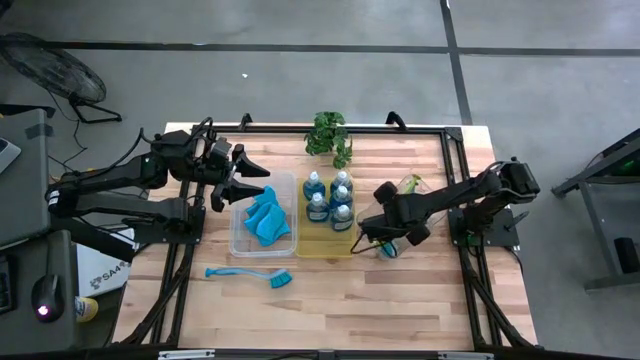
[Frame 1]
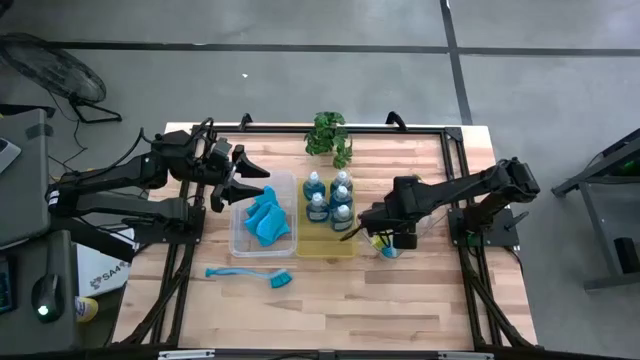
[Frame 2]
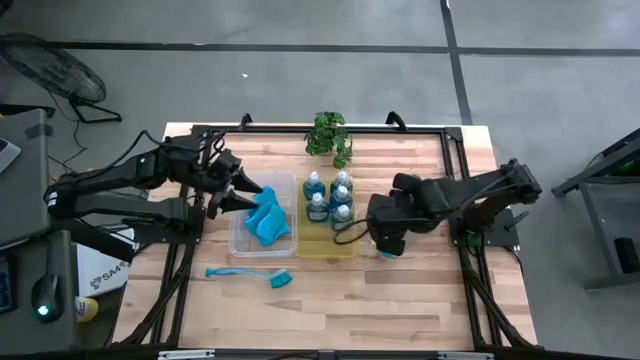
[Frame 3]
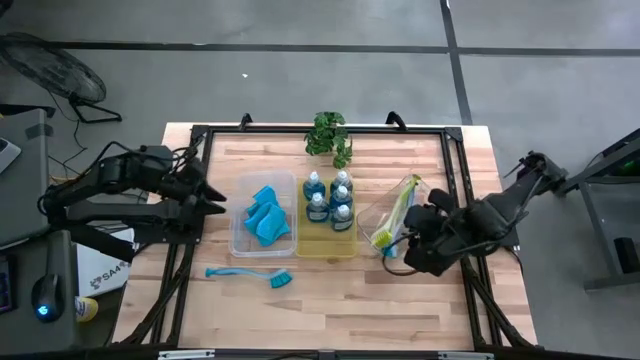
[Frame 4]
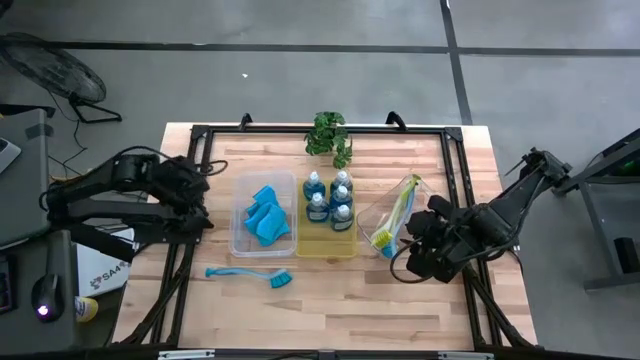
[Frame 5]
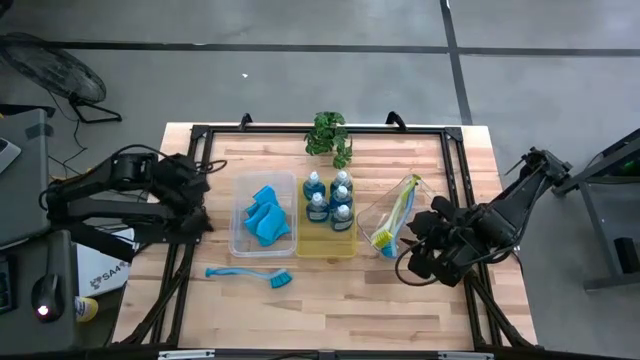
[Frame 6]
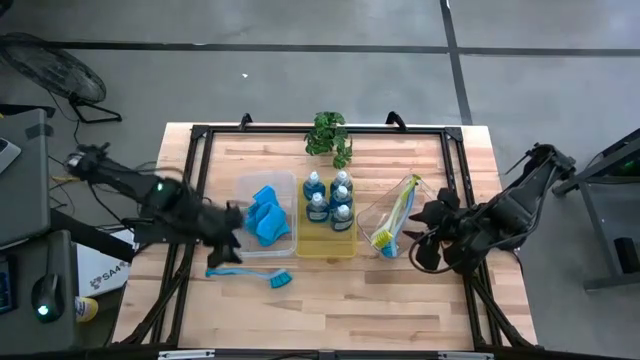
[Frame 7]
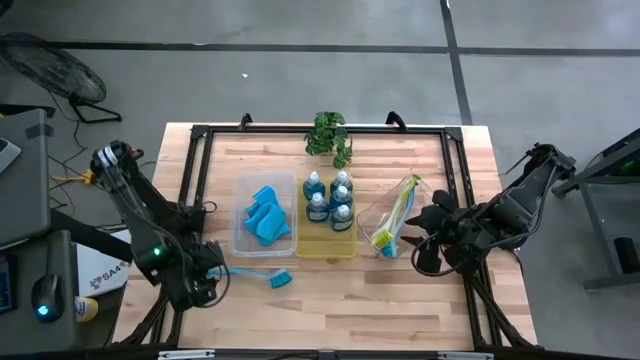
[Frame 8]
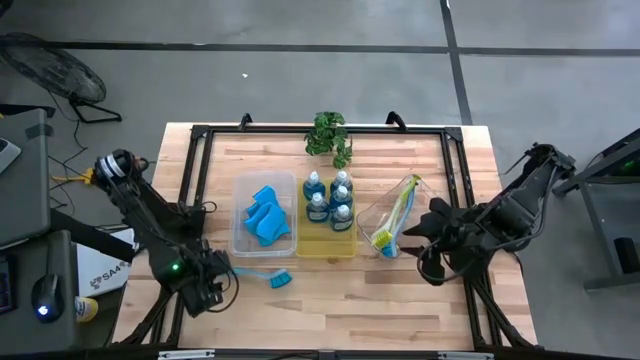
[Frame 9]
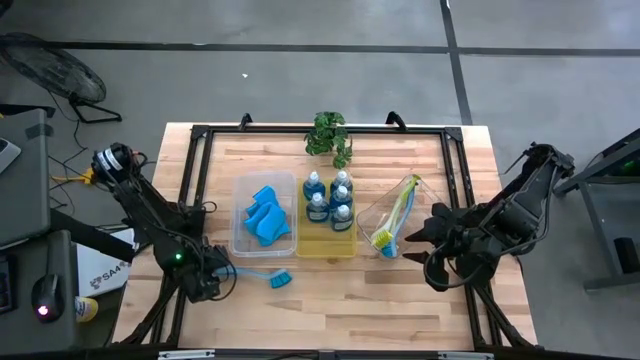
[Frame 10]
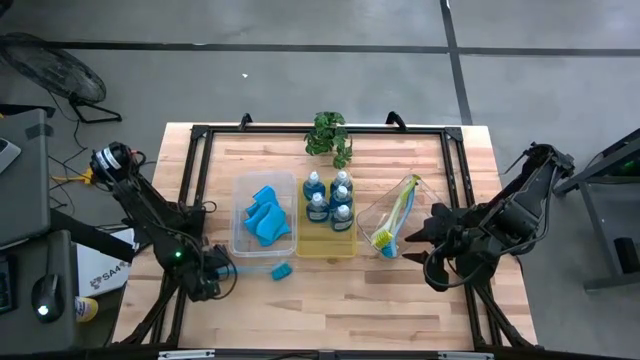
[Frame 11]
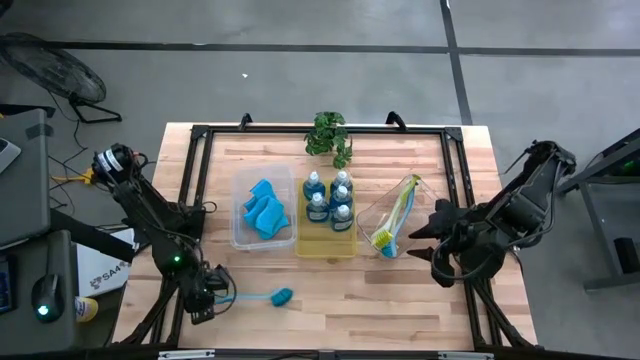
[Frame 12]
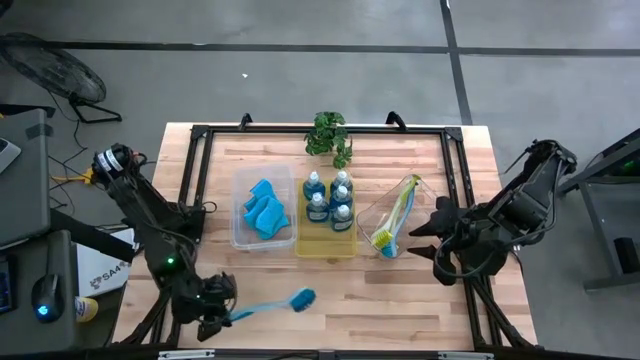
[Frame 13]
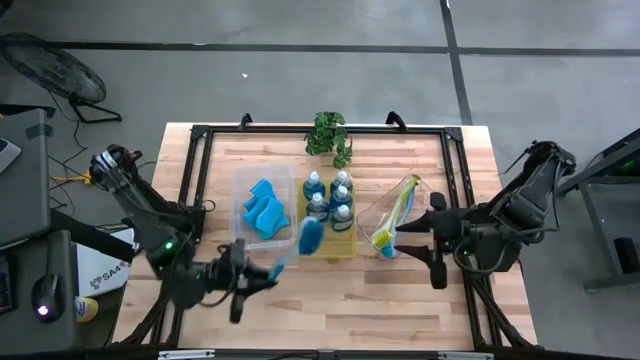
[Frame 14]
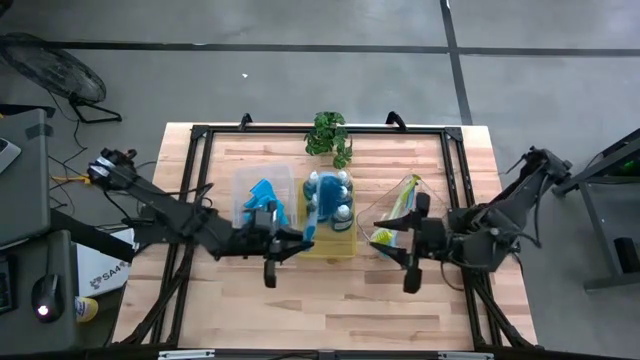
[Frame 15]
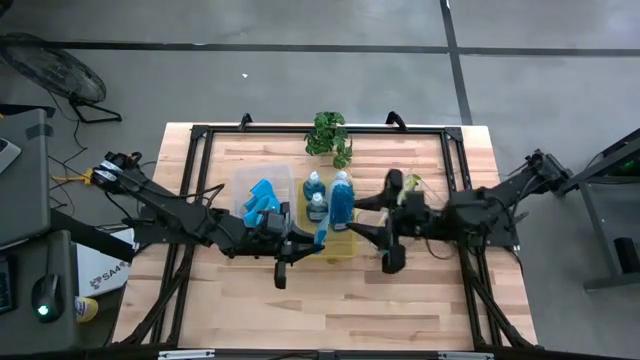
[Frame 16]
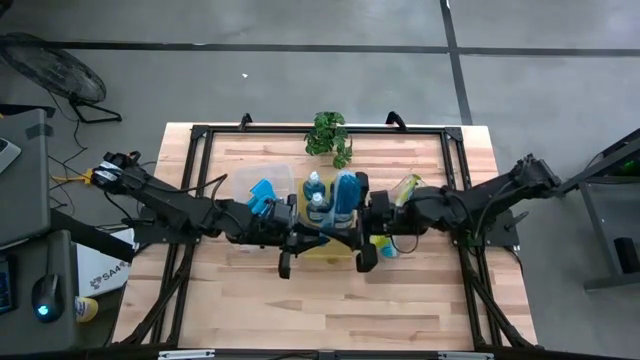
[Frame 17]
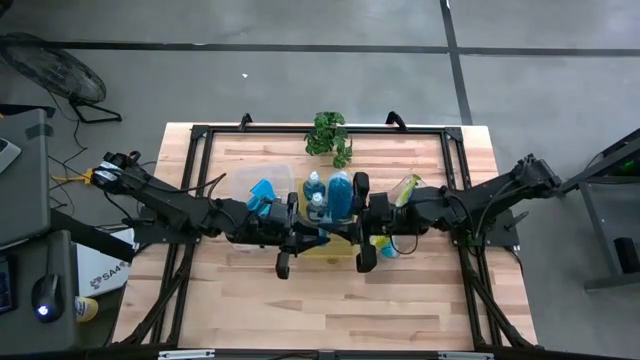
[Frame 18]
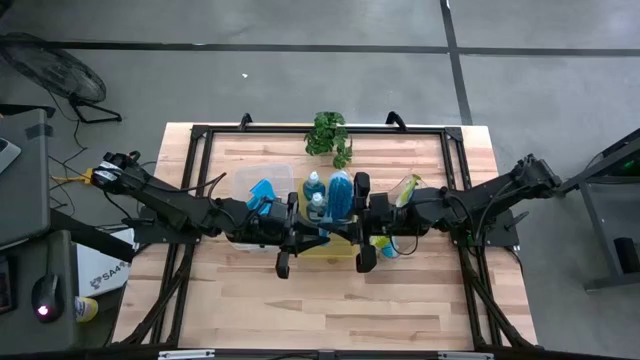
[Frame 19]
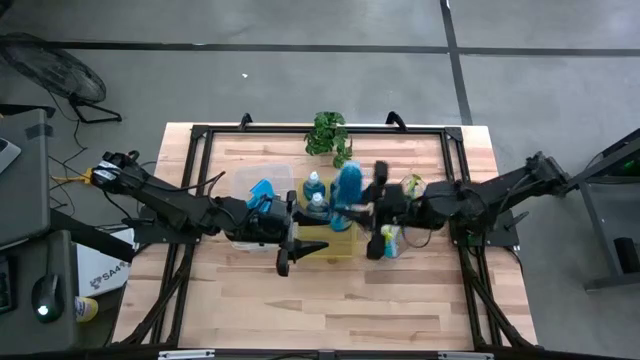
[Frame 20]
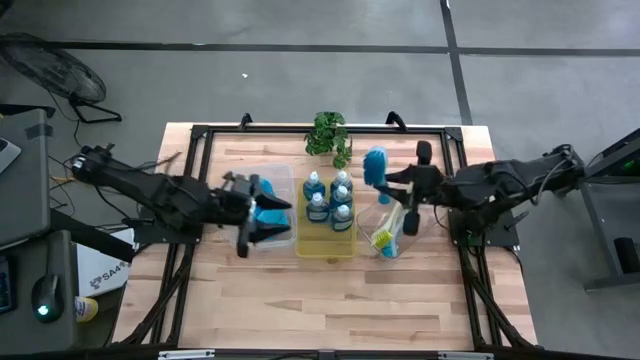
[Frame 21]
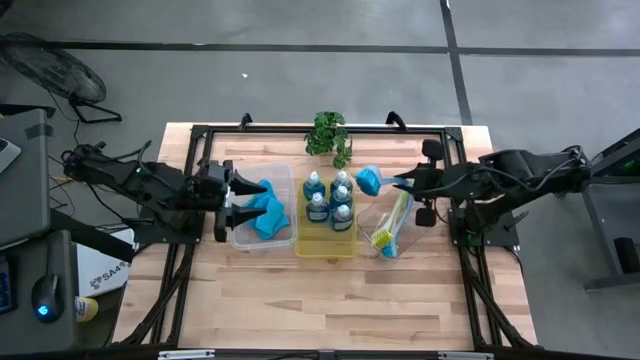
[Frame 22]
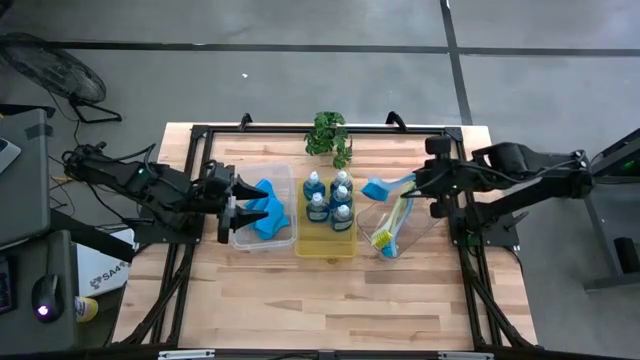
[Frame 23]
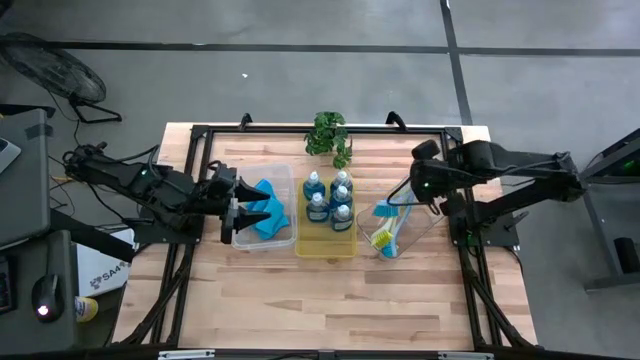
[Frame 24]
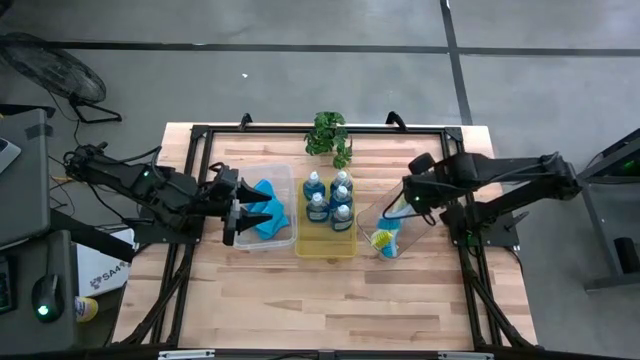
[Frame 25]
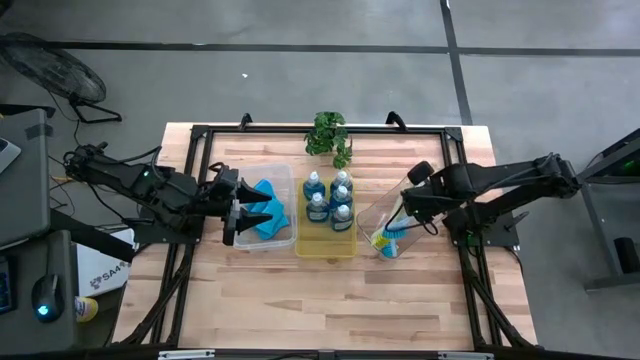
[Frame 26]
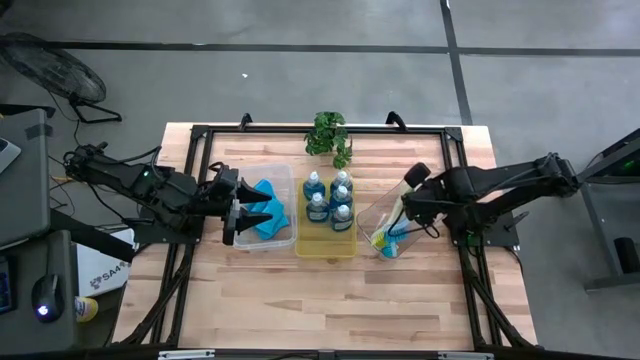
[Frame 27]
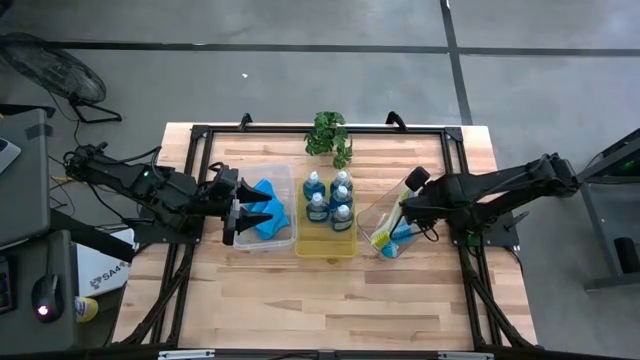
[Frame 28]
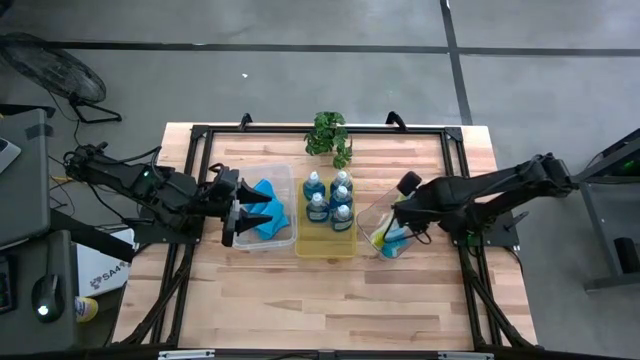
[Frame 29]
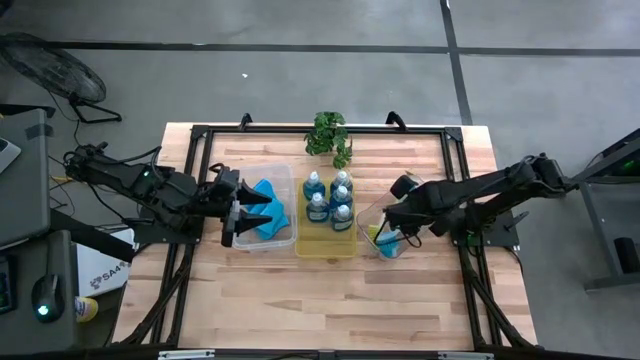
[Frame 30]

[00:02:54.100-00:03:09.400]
Task: Pick & Place Kitchen Sink Supplies
Put the blue toilet brush into the transparent bin

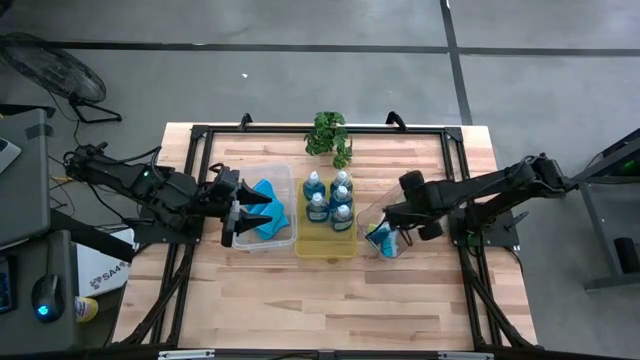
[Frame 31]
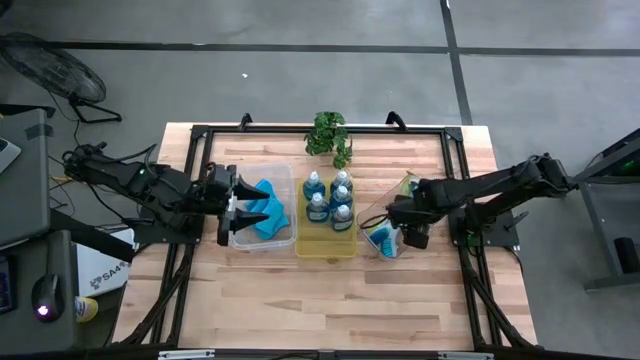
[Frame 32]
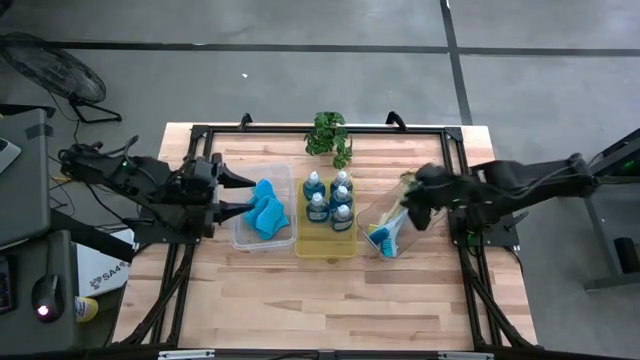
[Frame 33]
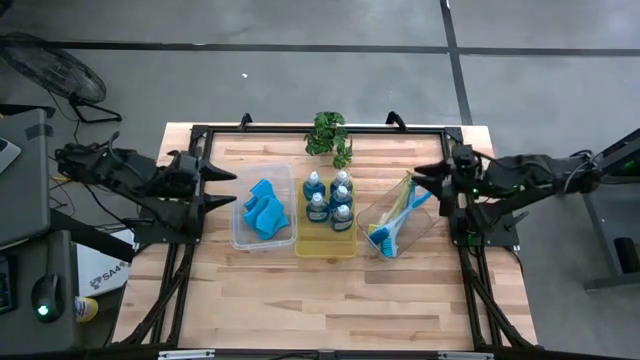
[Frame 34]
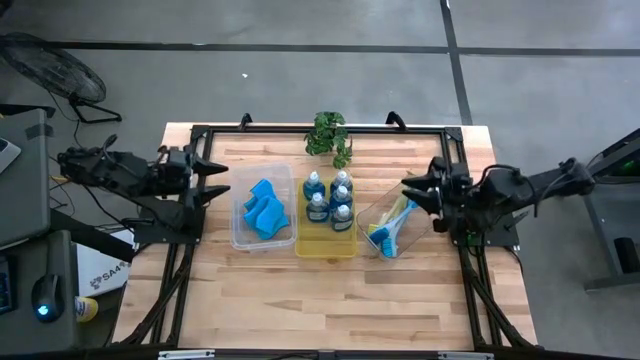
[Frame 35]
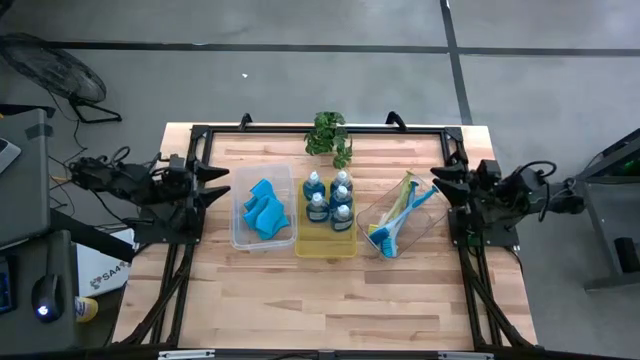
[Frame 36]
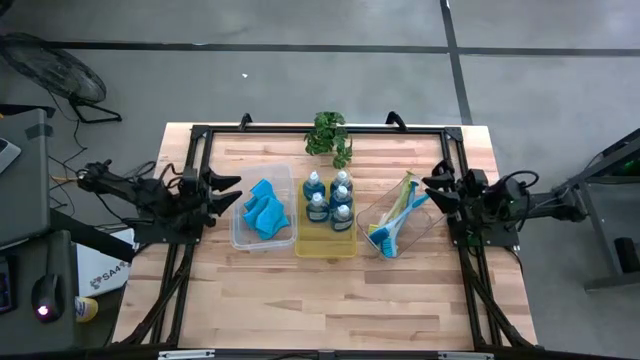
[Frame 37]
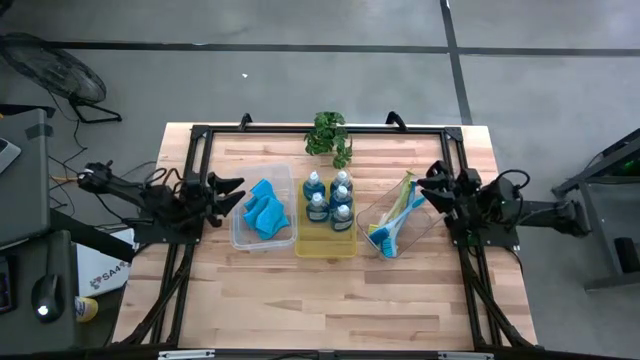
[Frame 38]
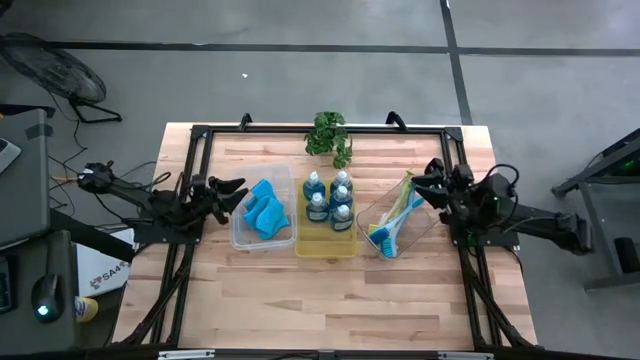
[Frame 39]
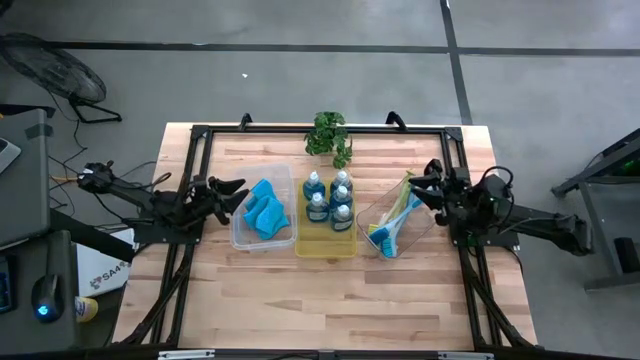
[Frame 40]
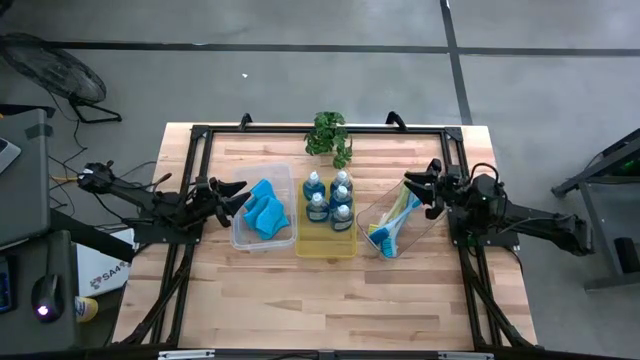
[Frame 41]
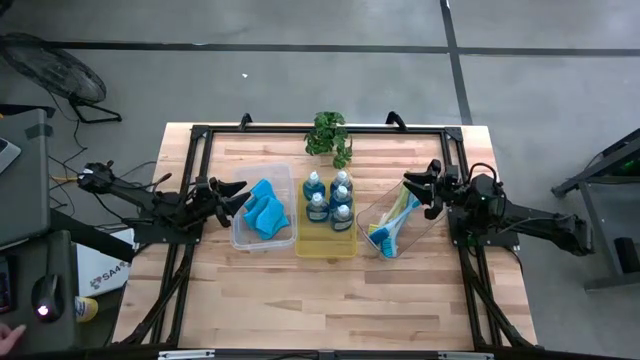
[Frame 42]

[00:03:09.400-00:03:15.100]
Return to Home Position
